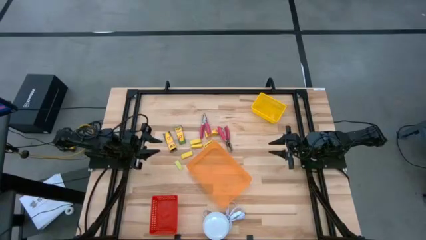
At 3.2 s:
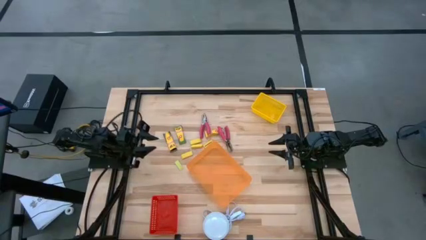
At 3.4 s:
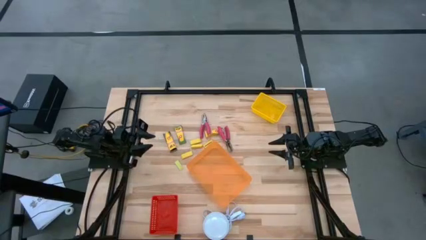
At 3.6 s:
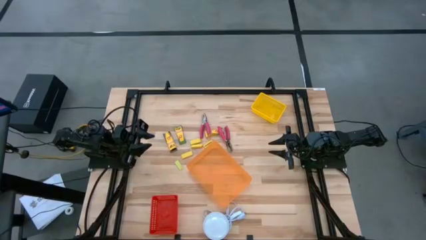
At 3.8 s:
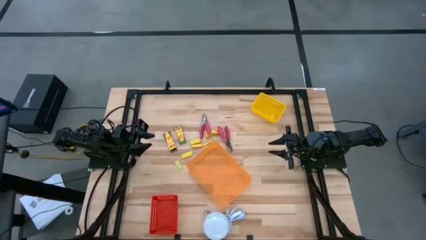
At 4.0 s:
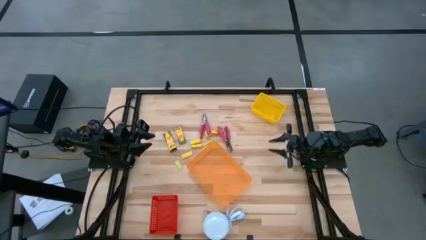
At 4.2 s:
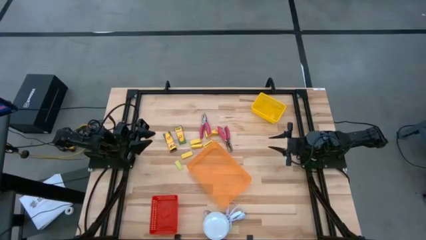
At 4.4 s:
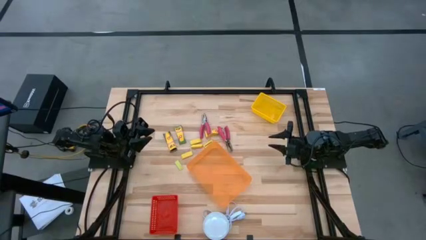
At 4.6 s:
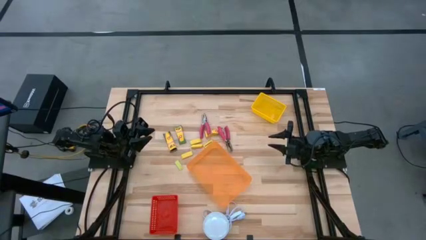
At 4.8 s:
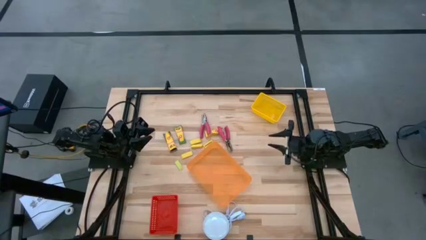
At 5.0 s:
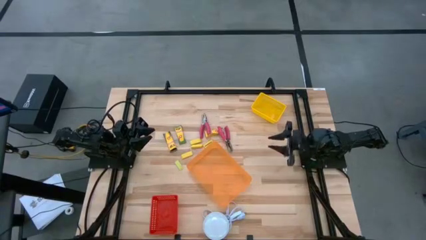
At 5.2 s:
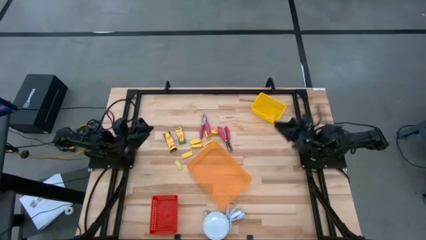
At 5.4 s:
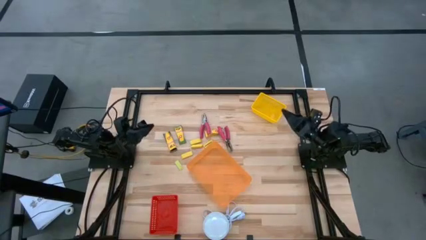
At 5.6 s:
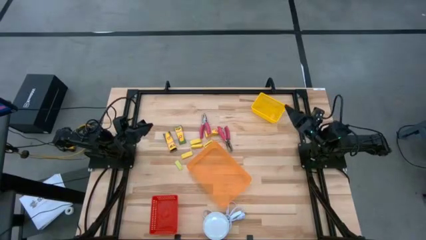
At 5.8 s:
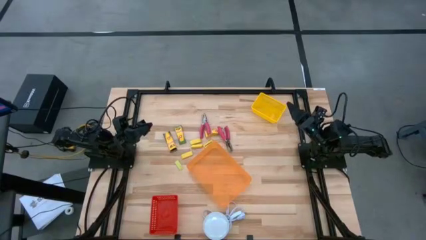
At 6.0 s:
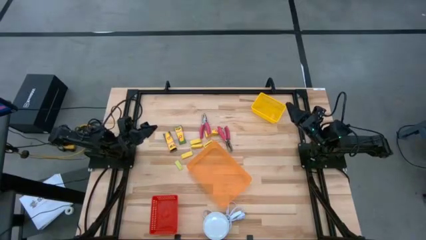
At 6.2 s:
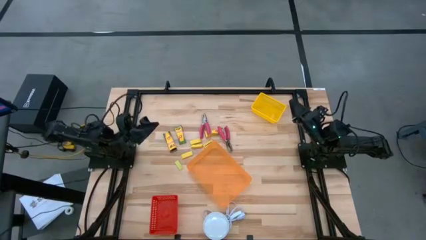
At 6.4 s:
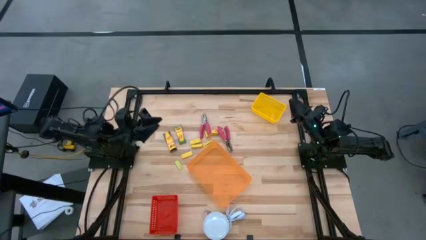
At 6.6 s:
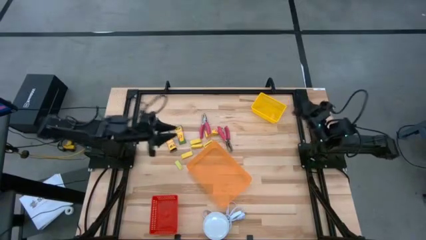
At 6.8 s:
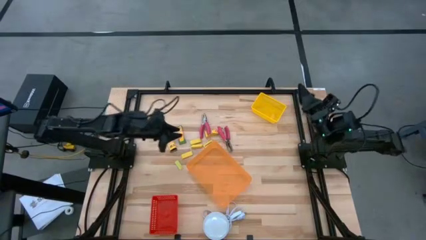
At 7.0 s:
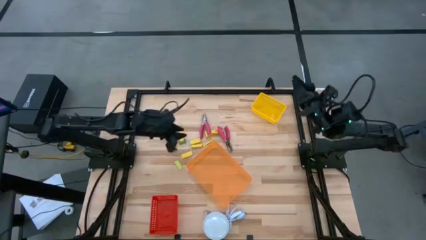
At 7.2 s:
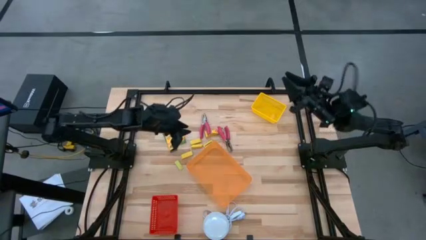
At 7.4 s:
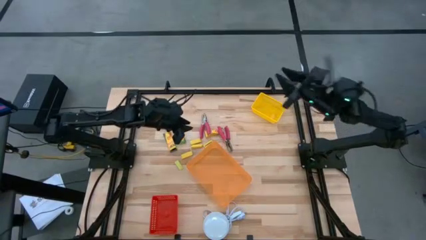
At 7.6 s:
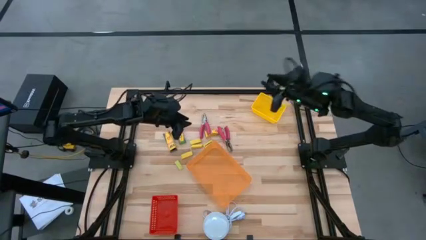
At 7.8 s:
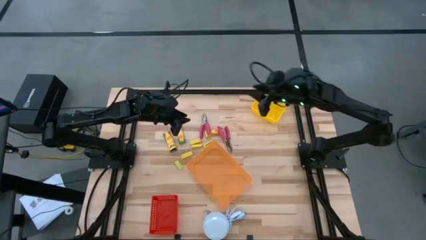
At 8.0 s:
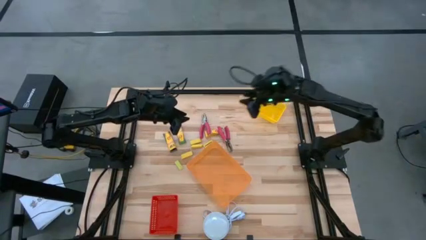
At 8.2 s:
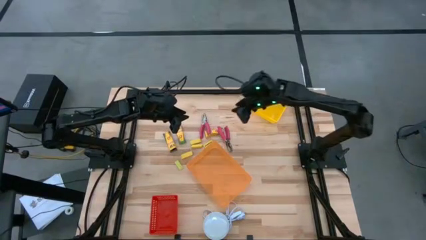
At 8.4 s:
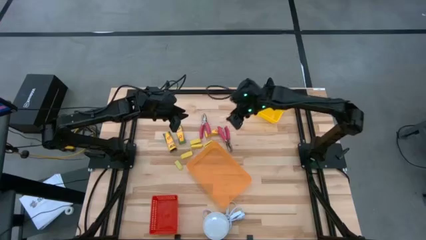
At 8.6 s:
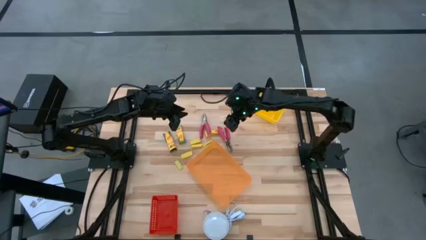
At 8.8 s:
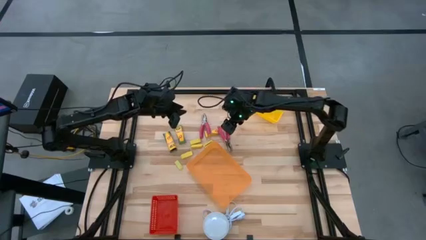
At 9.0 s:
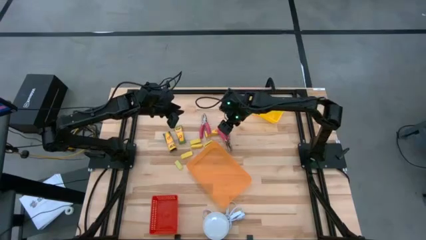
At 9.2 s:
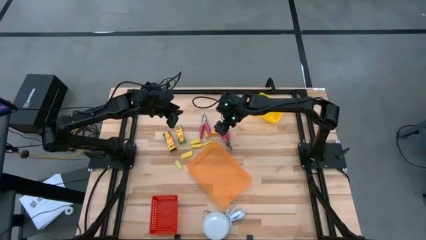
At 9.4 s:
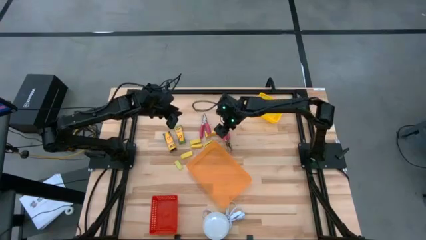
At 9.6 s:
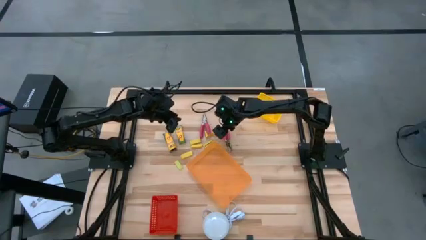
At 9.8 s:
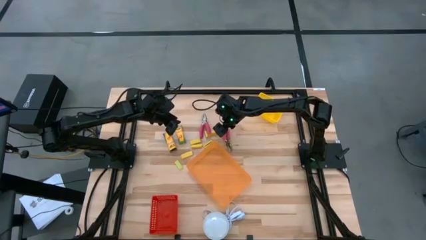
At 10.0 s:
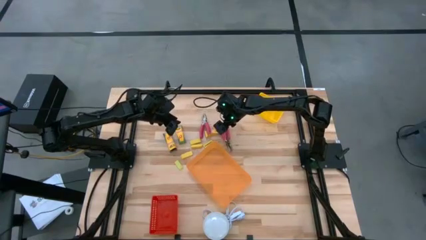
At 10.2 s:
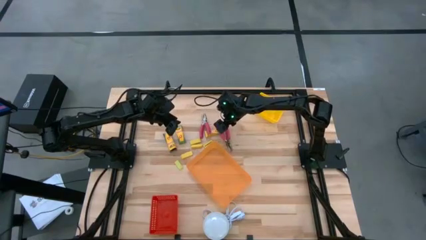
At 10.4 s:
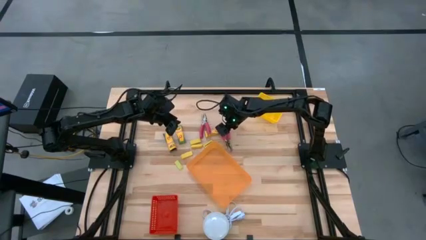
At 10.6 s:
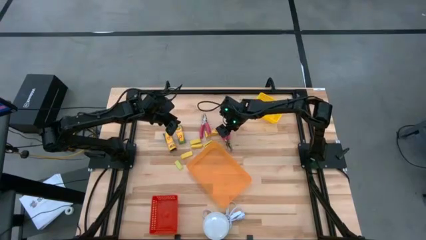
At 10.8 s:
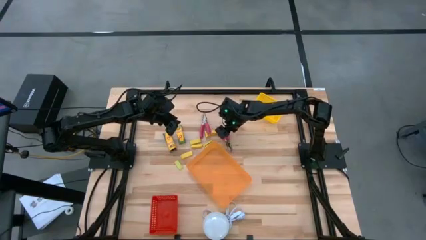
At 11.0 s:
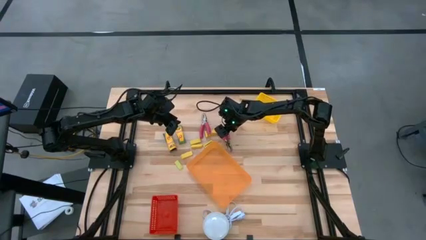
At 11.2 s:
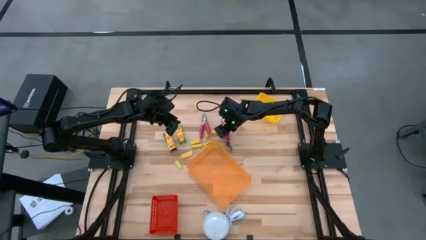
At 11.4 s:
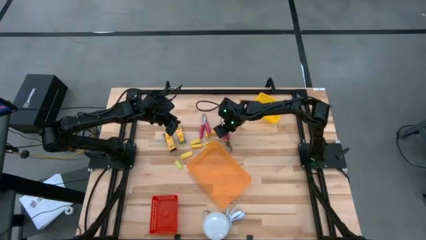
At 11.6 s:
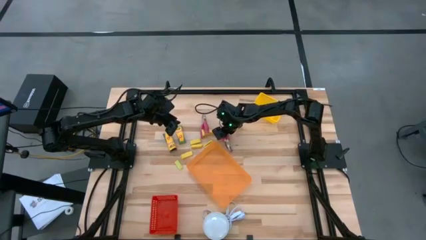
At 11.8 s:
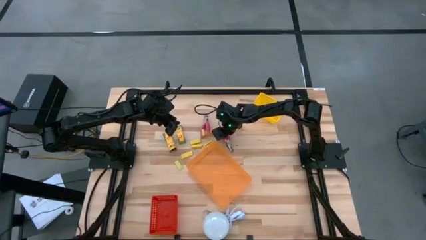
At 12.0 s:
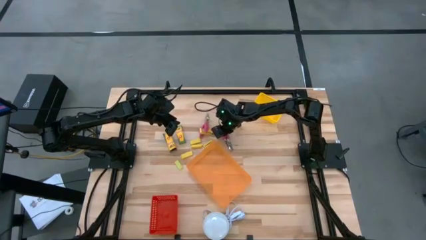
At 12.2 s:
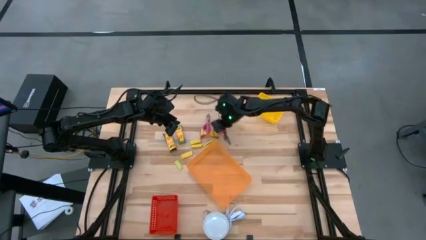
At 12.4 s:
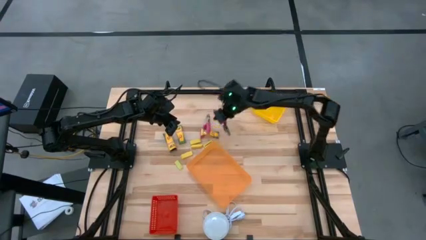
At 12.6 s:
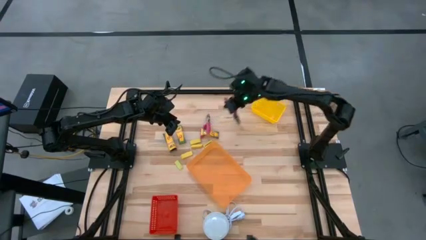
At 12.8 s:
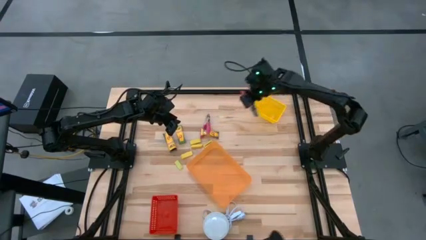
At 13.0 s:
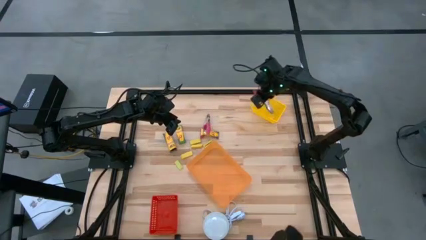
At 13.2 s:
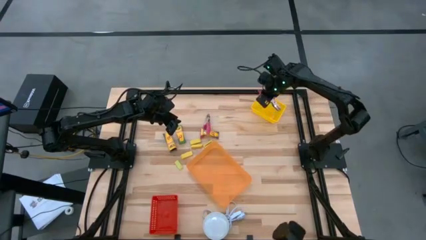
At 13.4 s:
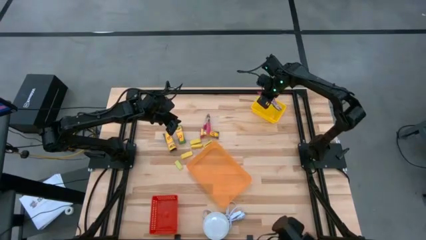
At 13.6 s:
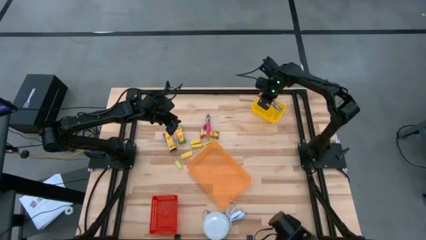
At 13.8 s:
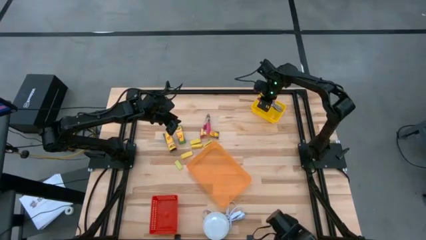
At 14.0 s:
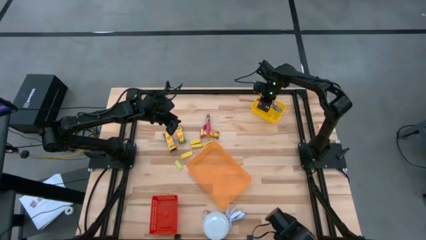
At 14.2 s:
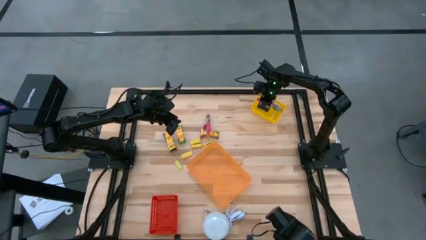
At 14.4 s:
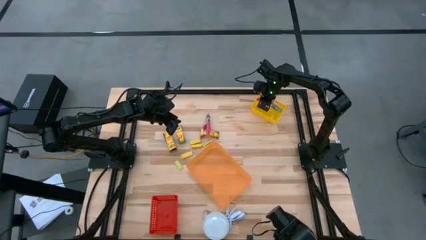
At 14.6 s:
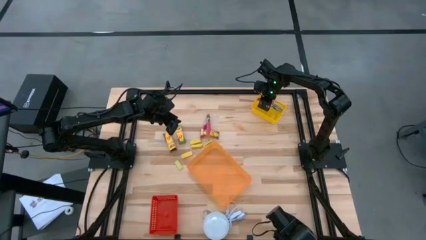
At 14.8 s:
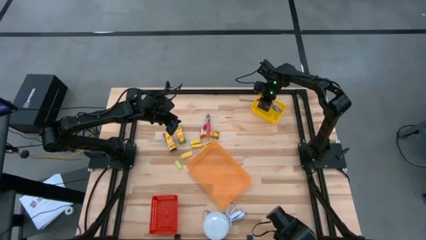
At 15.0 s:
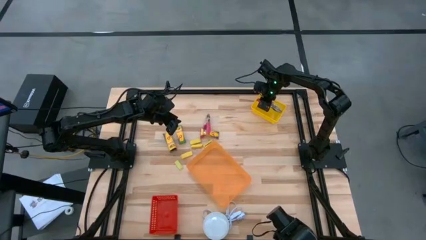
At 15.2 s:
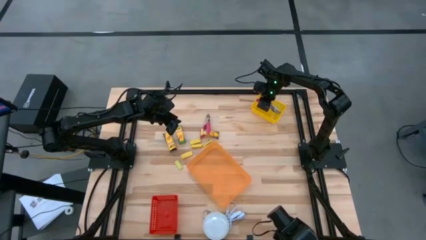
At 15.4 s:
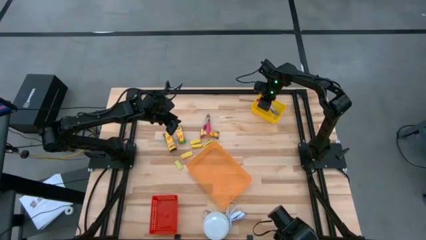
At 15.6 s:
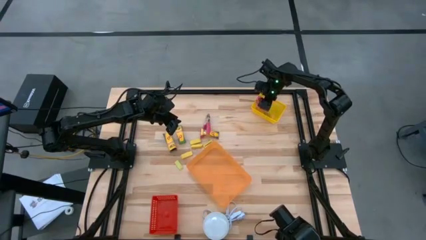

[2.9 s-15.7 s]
Task: Pick & Place School Supplies
Put the pink puncher into the yellow bin
